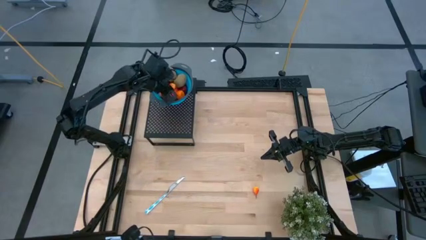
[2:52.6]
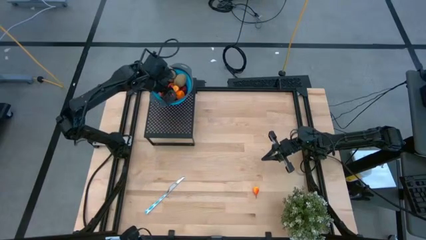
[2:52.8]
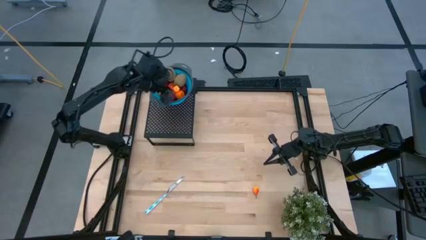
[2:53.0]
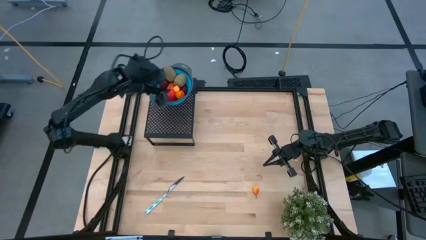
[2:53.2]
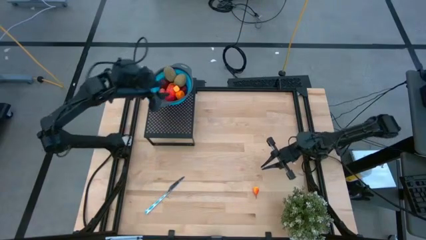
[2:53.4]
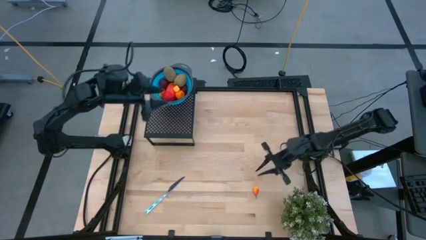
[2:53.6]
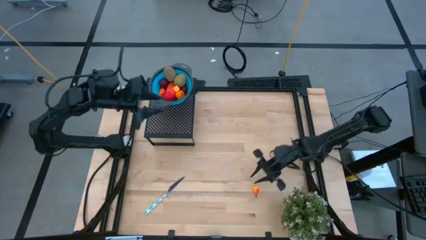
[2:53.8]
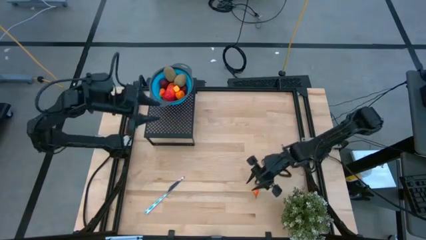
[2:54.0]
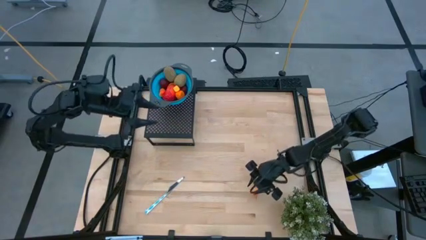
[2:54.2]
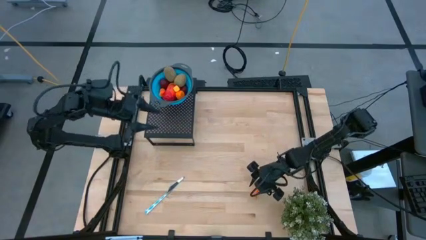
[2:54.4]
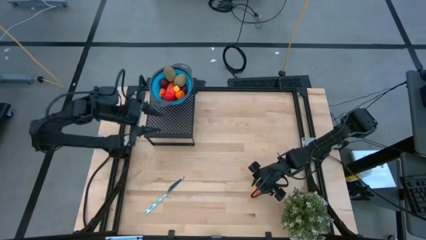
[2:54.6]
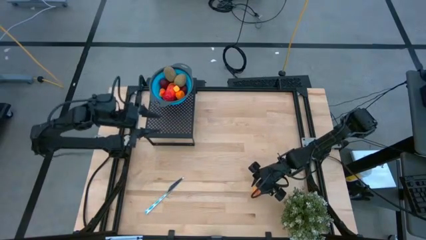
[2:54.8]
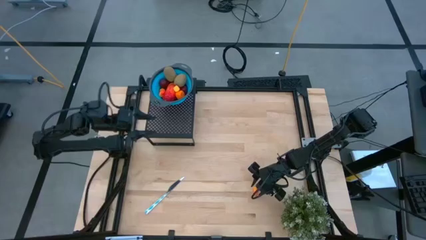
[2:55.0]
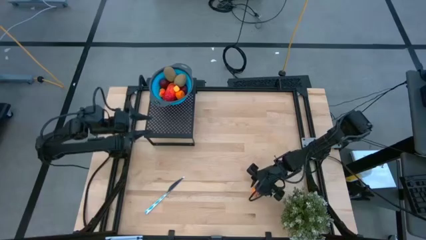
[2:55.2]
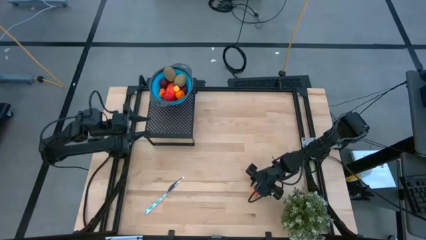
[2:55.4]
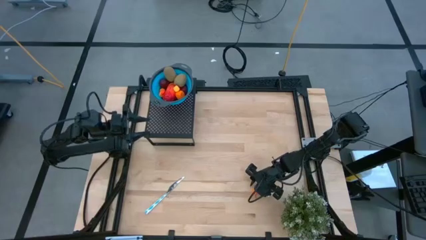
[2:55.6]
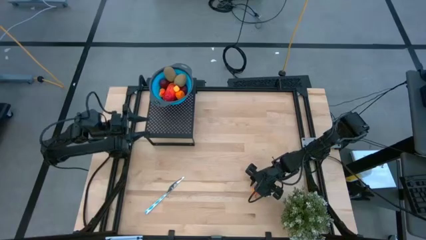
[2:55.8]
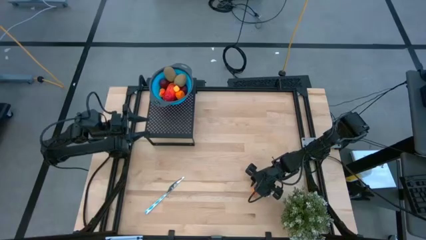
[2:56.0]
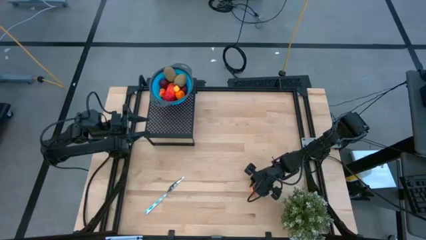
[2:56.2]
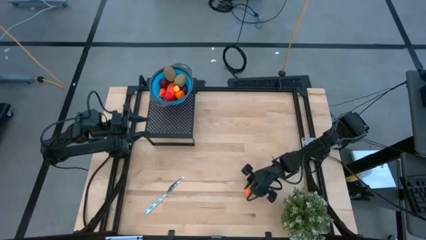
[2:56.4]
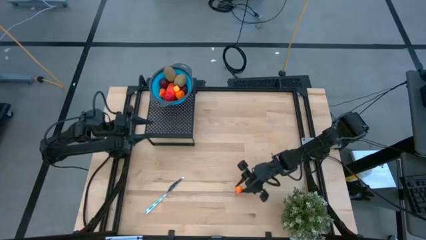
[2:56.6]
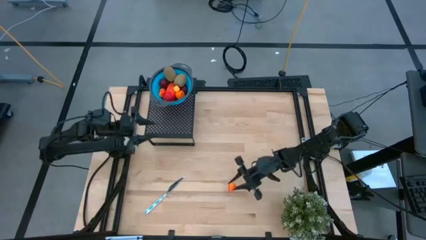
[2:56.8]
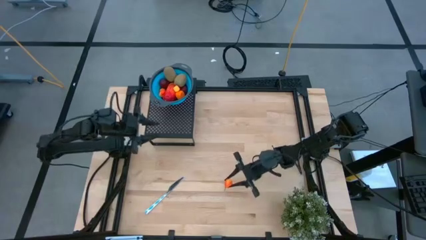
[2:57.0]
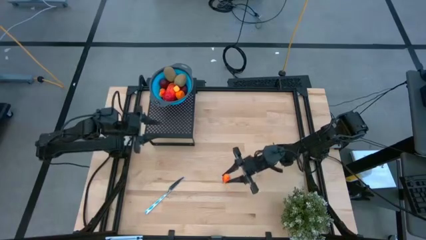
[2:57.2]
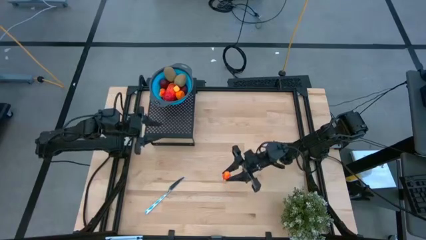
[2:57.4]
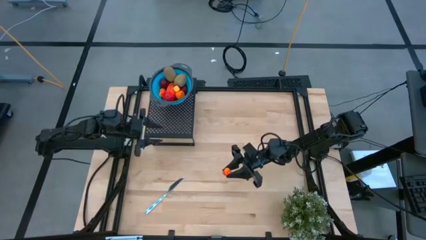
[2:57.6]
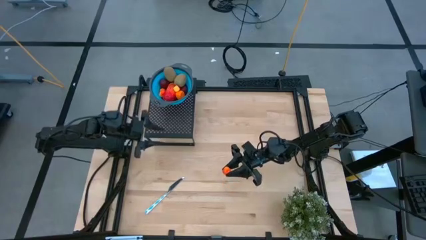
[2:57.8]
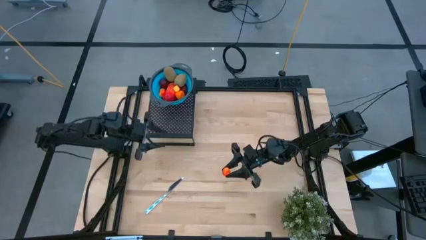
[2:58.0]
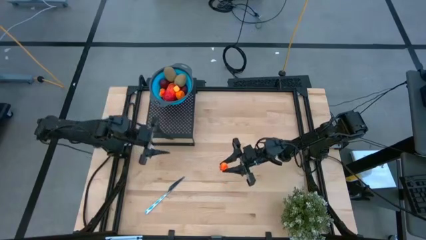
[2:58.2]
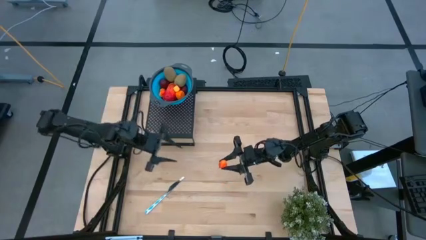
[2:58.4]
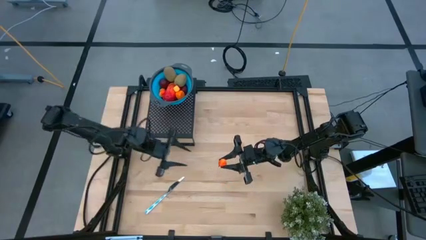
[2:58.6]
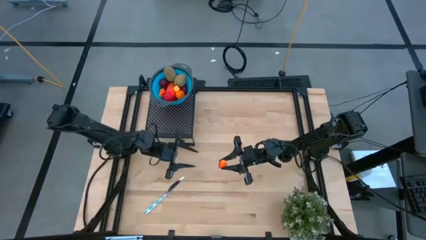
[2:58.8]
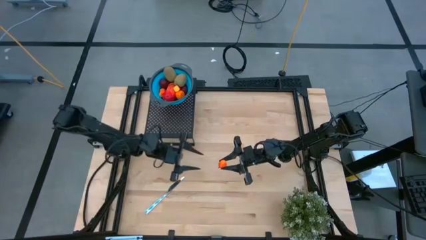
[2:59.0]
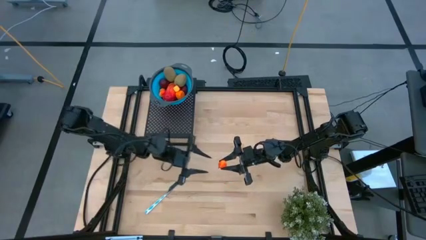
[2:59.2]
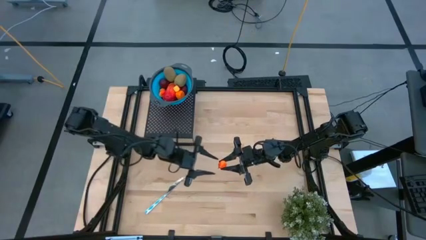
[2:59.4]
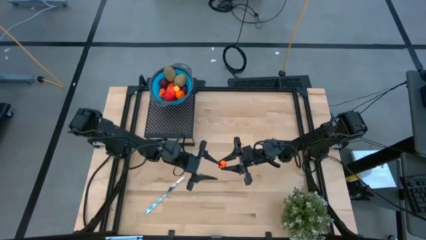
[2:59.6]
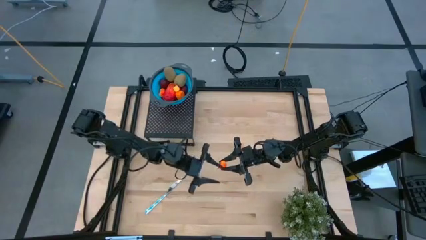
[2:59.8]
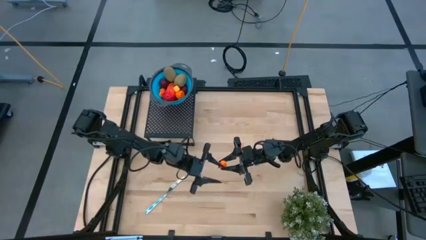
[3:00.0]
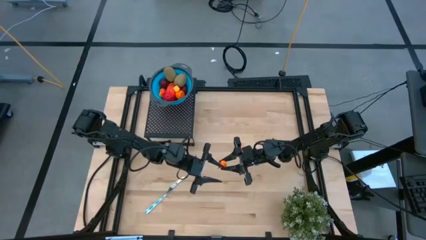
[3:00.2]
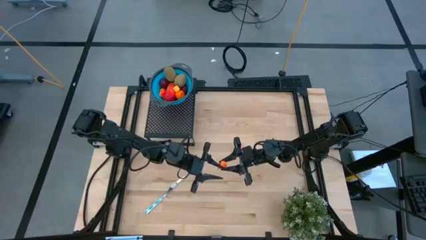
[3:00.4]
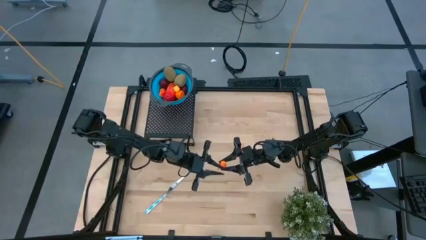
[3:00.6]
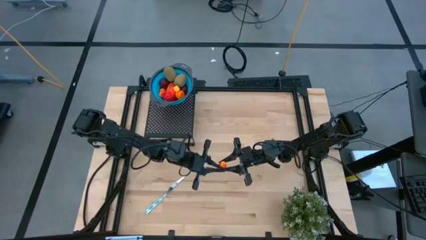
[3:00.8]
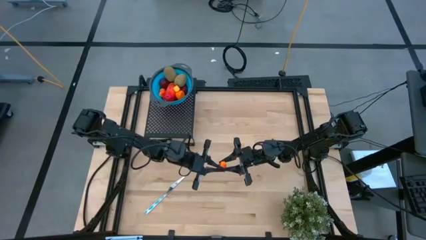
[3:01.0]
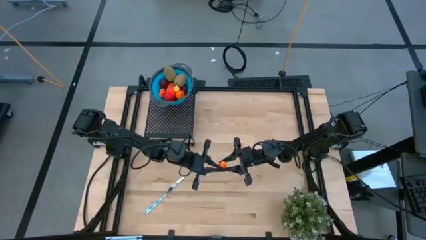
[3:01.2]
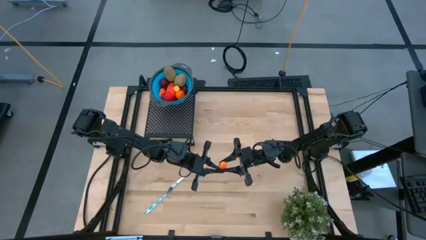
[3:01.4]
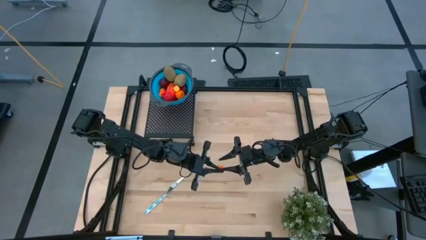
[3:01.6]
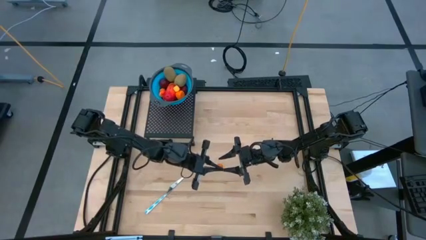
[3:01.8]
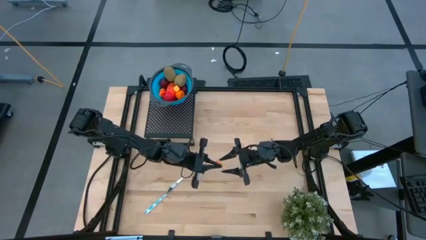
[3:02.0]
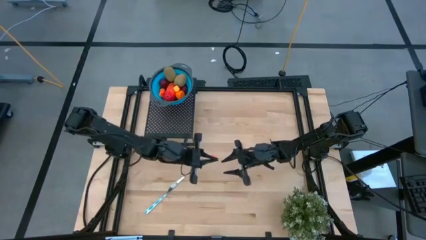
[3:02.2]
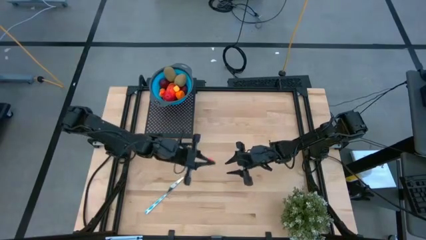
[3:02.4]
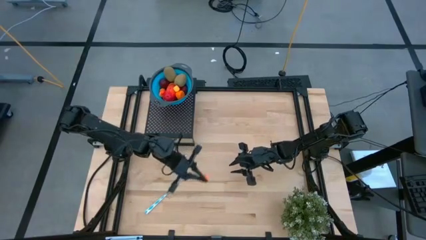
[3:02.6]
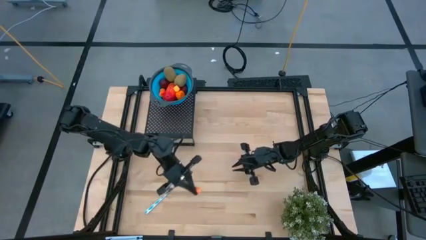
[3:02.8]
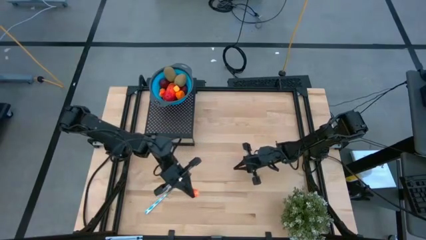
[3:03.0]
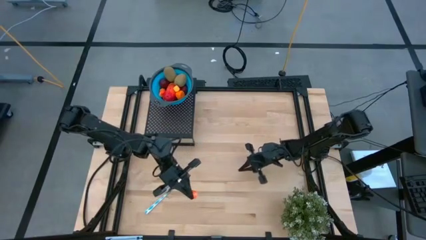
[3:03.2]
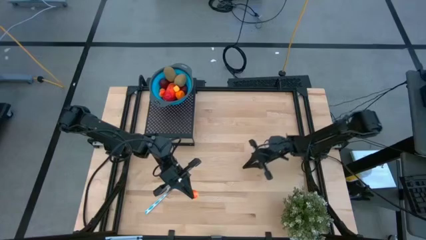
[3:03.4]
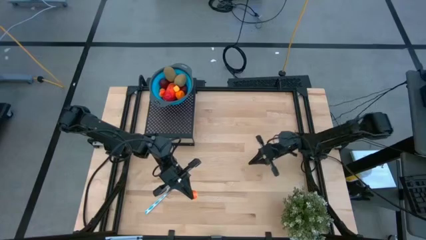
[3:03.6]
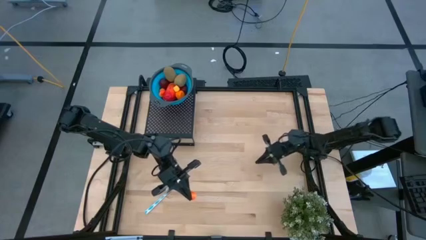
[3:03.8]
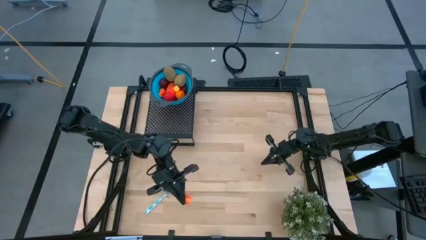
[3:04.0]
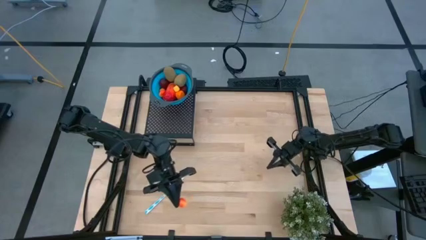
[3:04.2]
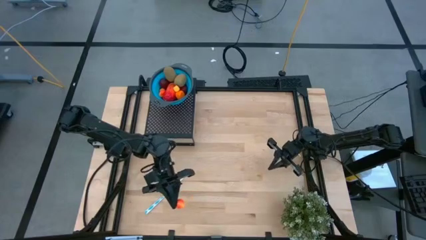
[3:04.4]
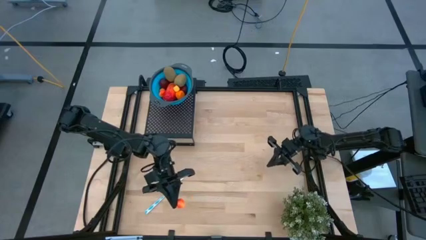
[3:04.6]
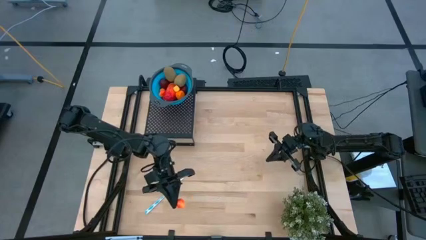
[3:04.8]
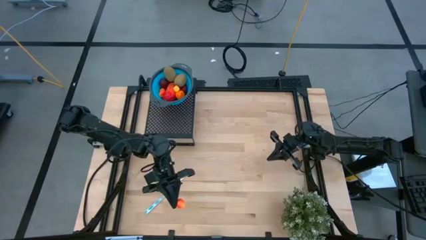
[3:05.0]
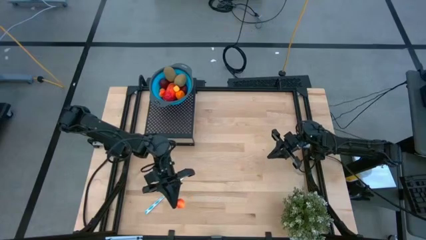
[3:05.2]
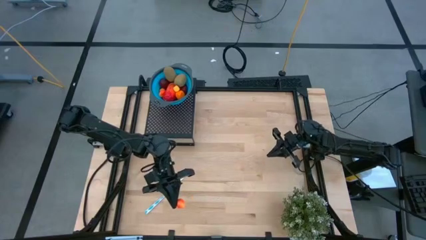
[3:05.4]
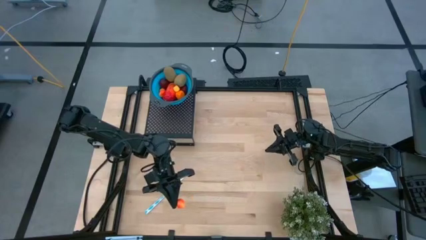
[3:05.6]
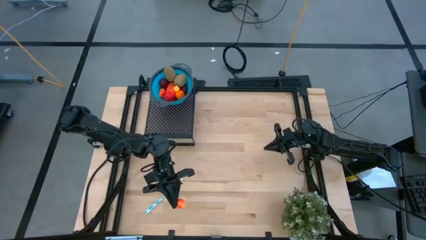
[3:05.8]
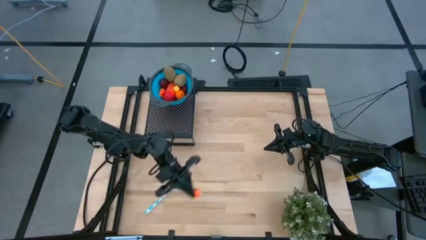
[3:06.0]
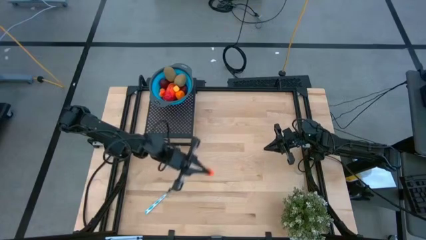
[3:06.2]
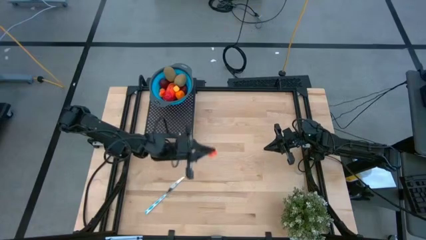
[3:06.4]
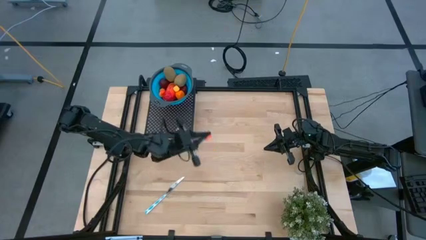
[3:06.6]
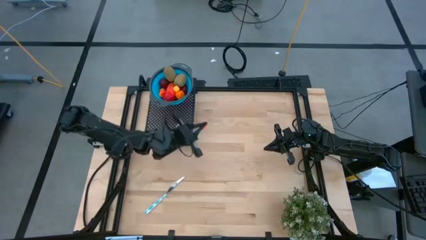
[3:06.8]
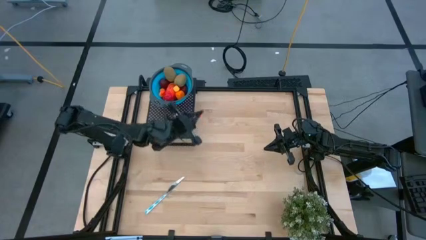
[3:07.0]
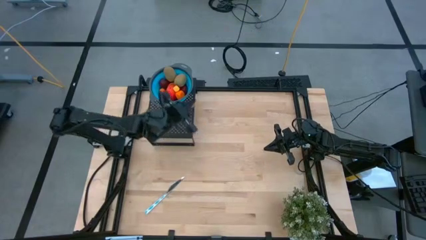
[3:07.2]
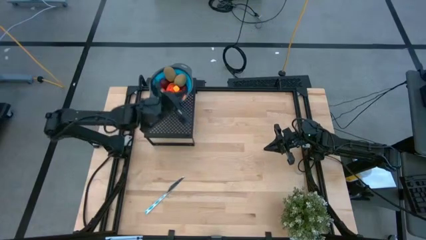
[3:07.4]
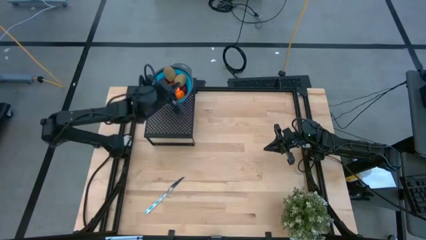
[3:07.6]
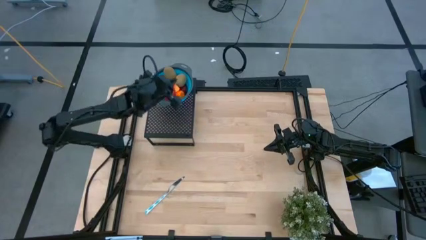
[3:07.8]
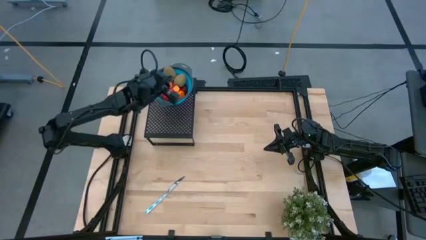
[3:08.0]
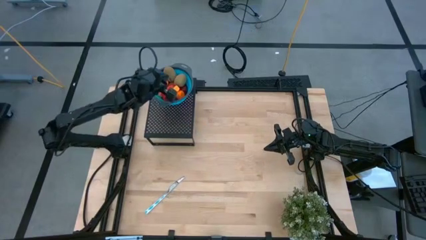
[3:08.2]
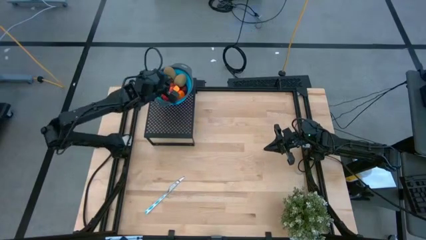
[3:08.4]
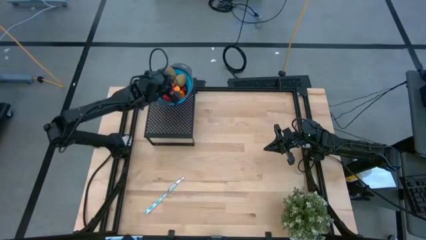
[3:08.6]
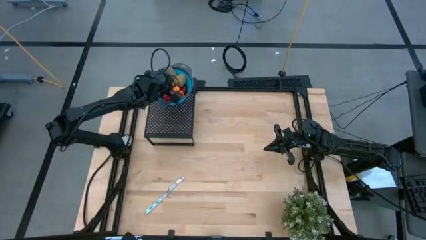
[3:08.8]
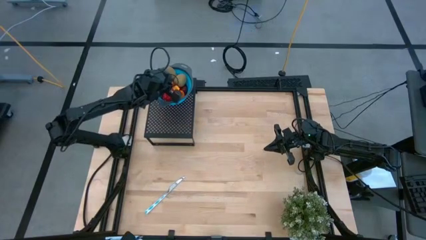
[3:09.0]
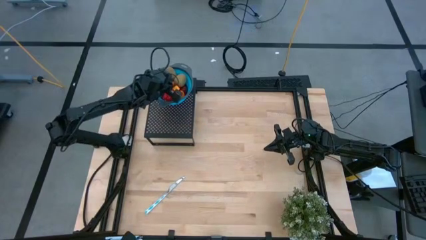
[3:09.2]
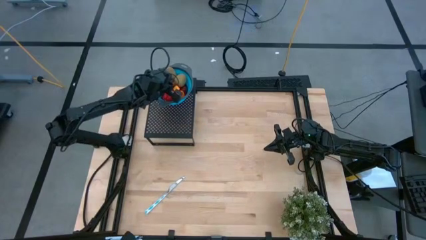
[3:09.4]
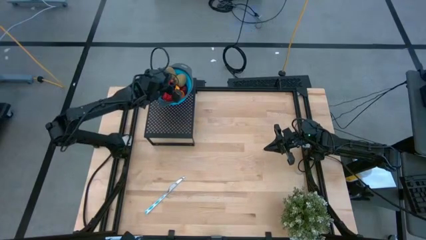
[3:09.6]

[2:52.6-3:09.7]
Task: Pick & Place Fruit
Put the peach into the blue strainer bowl on the shelf
